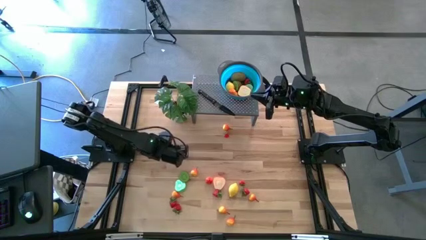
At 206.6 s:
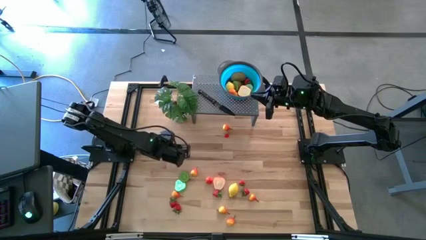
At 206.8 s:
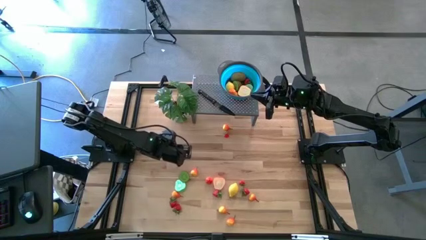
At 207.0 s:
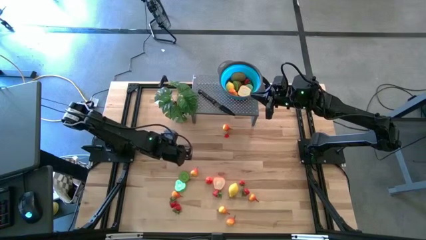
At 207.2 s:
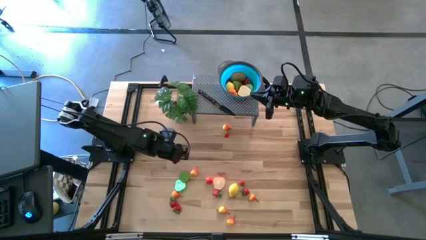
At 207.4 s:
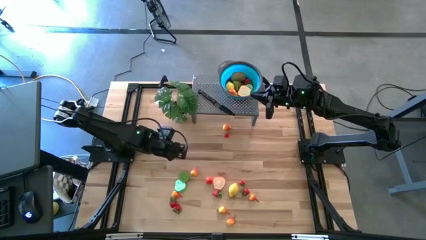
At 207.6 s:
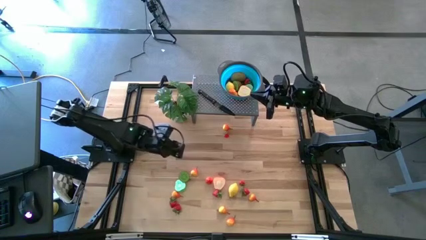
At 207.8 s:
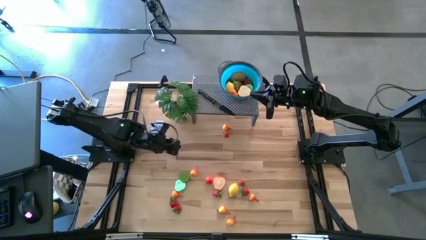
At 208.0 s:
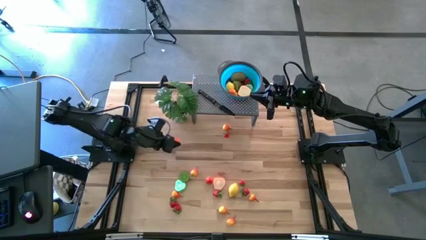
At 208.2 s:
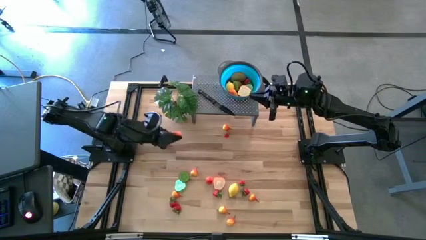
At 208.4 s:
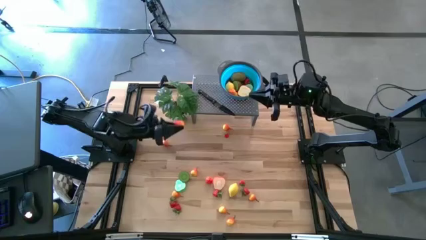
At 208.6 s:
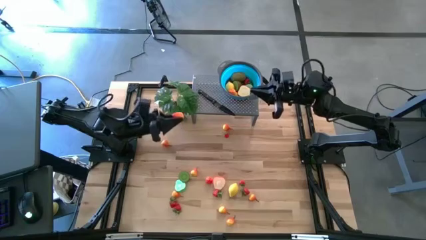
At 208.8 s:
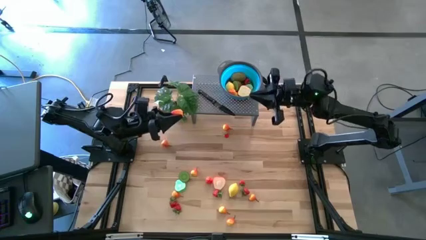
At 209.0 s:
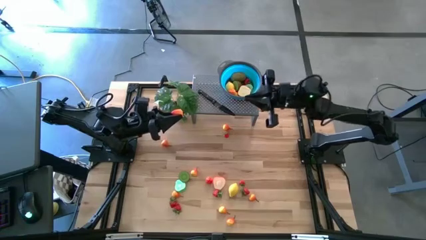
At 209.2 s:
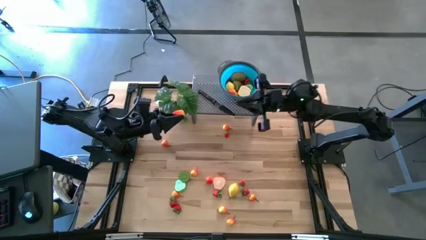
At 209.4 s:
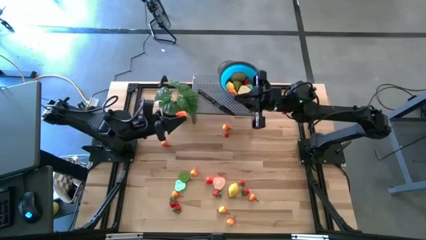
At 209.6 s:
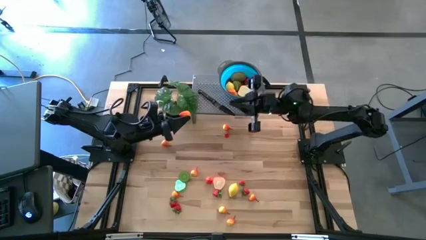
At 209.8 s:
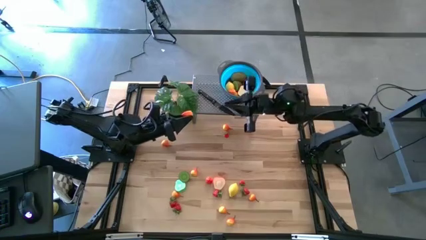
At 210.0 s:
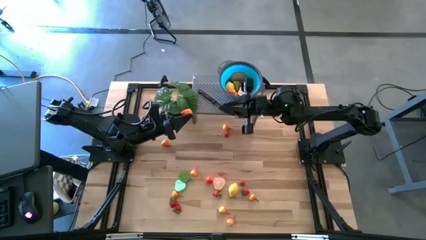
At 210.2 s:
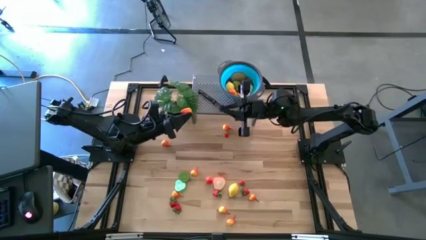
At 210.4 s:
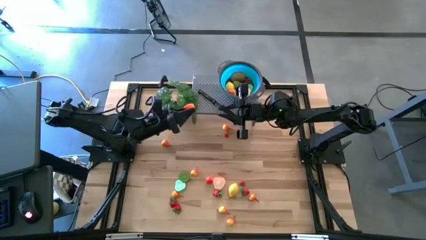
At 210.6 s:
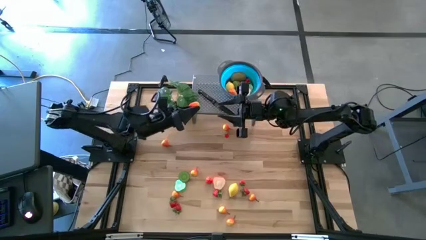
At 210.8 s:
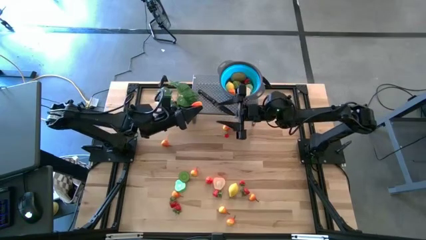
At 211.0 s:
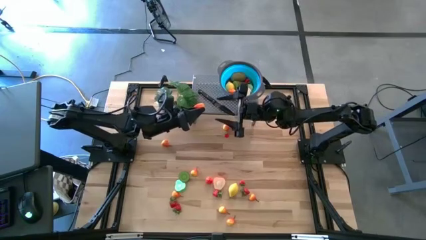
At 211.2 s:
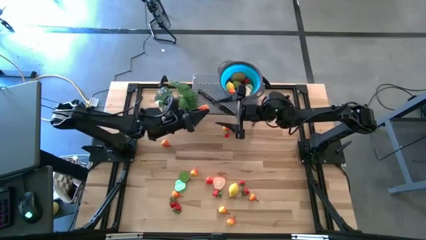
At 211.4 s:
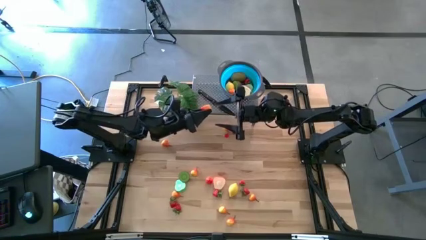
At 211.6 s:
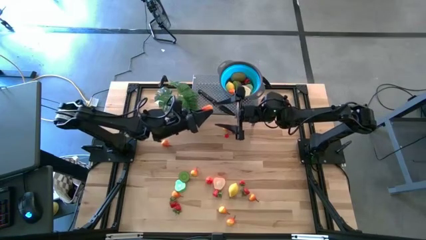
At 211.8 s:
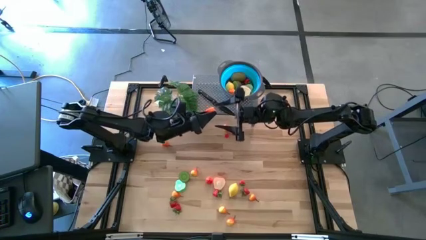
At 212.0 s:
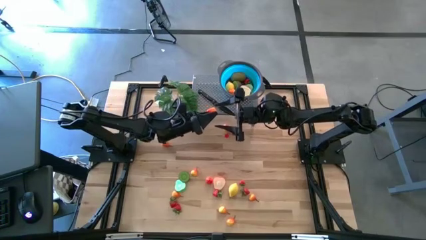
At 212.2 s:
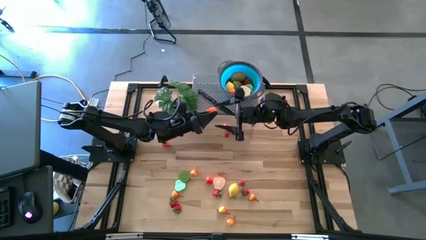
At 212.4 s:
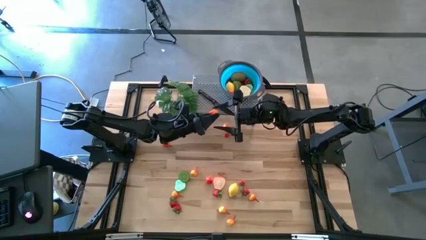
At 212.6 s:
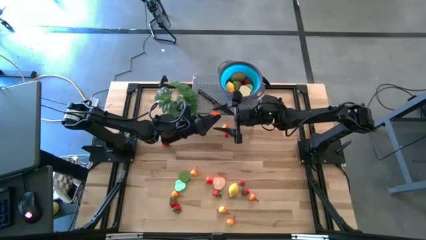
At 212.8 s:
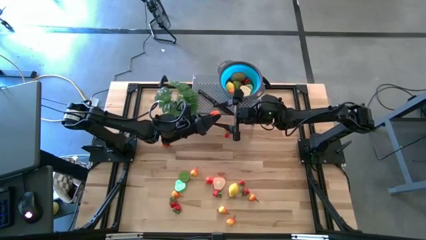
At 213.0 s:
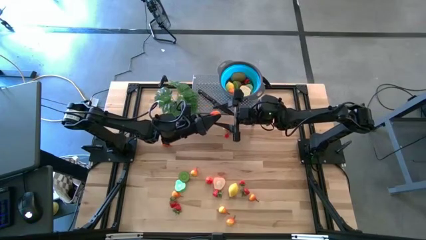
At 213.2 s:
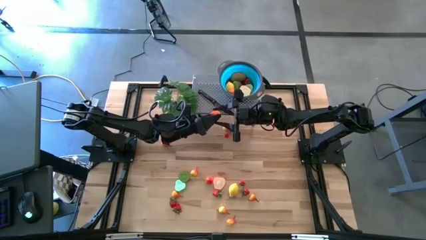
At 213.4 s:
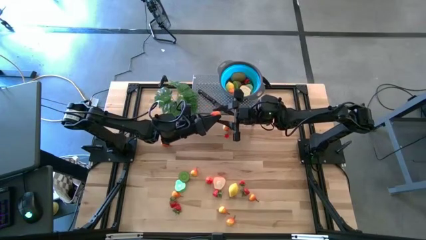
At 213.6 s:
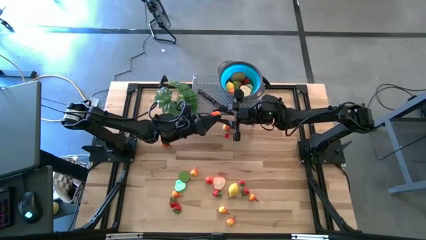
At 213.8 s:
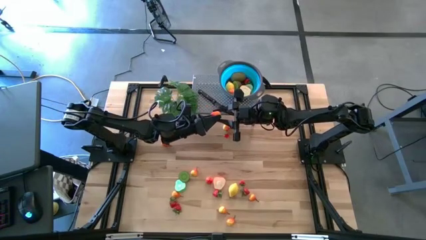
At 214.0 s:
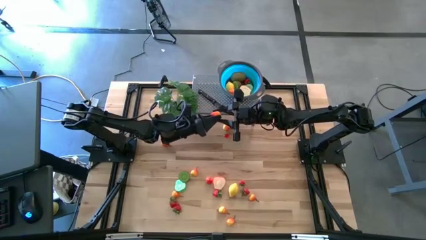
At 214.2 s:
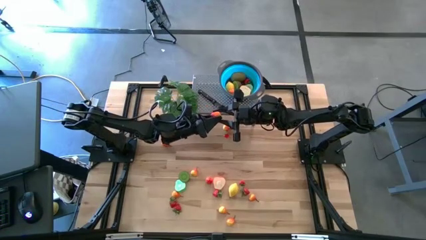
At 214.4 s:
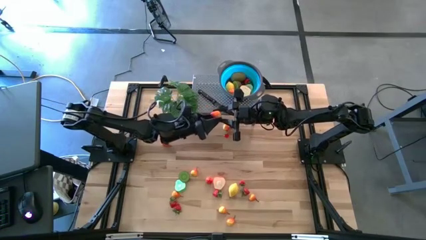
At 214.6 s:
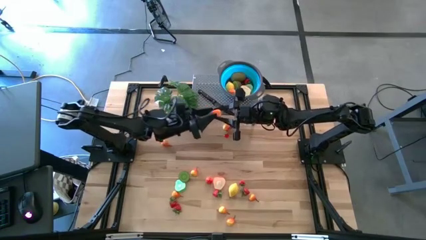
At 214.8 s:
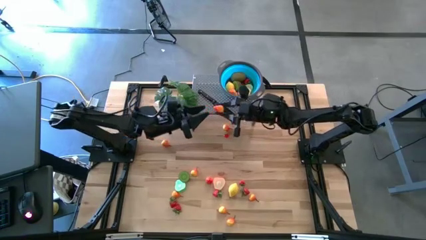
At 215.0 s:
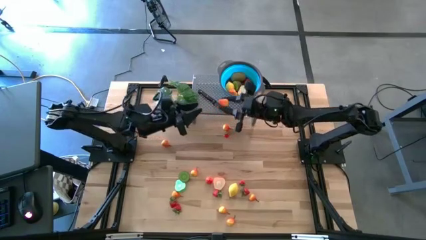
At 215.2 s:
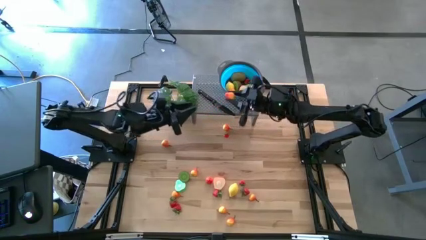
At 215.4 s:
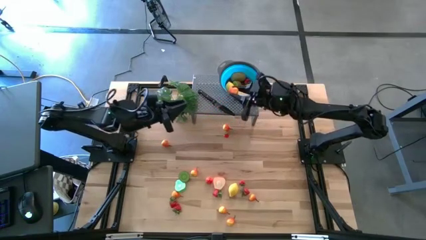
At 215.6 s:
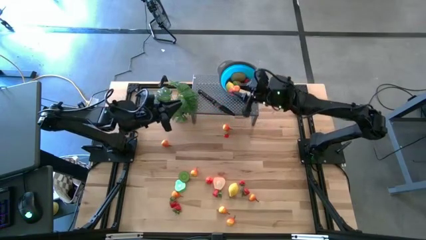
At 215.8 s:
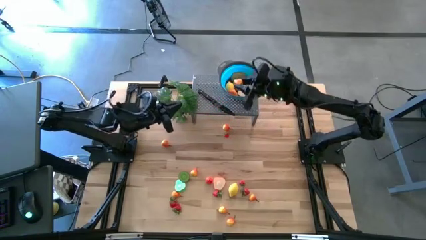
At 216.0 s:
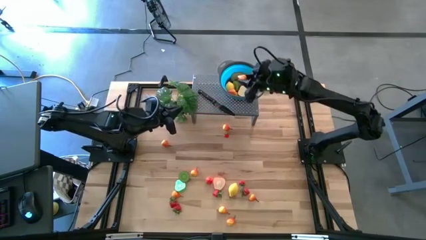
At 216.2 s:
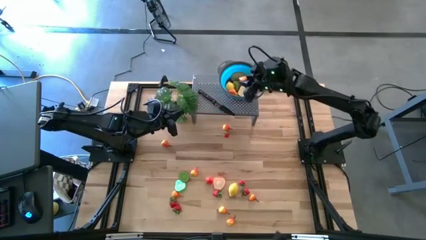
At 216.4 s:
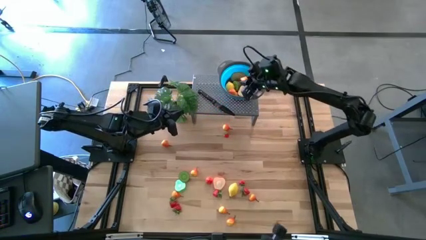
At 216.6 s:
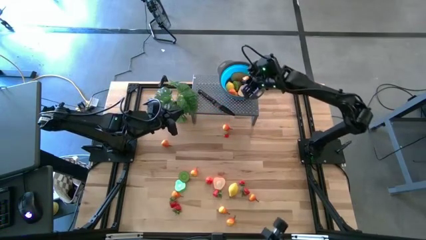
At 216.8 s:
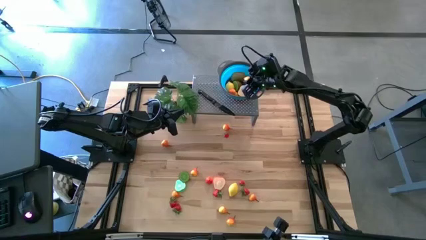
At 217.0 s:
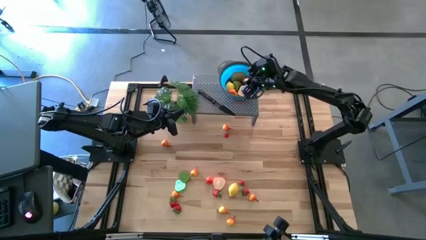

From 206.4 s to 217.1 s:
Task: Pick & Place Fruit
Put the yellow pear in the blue bowl on the shelf

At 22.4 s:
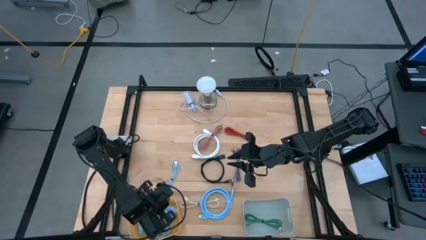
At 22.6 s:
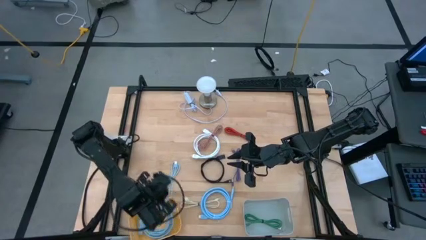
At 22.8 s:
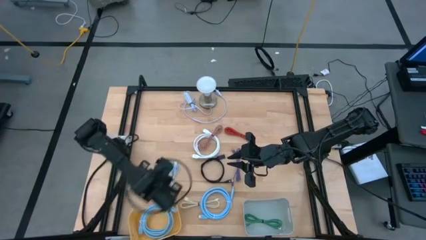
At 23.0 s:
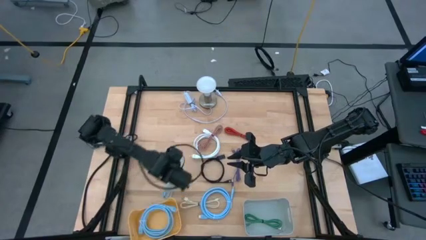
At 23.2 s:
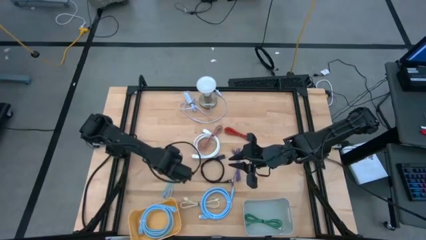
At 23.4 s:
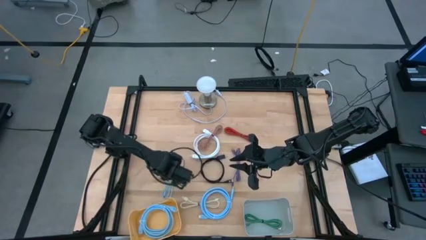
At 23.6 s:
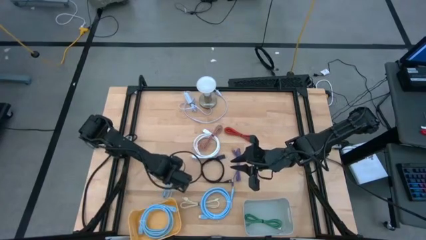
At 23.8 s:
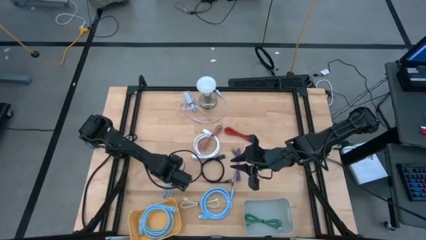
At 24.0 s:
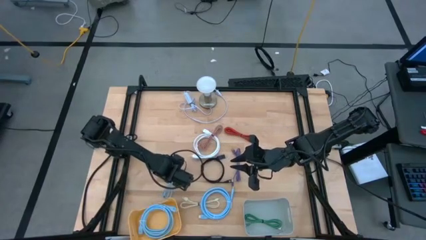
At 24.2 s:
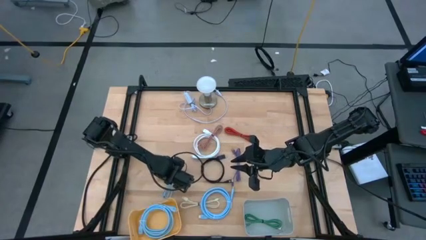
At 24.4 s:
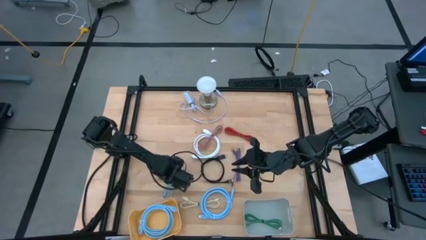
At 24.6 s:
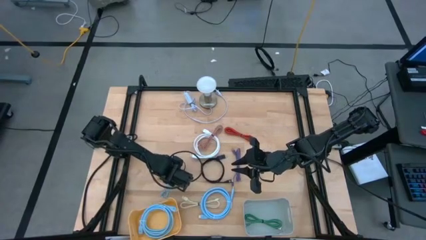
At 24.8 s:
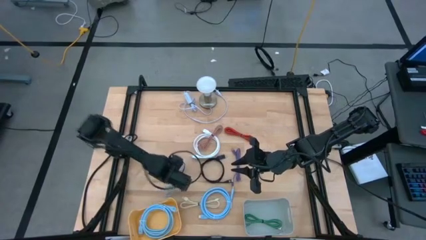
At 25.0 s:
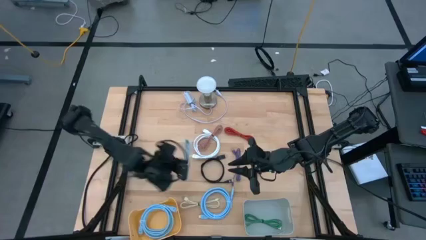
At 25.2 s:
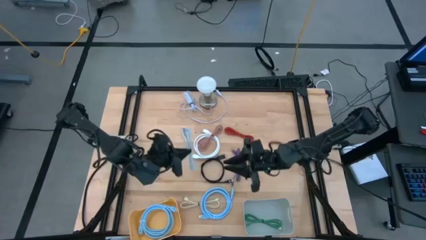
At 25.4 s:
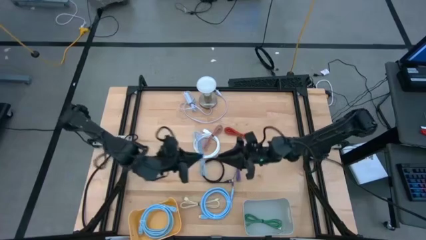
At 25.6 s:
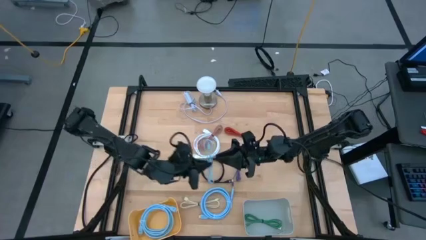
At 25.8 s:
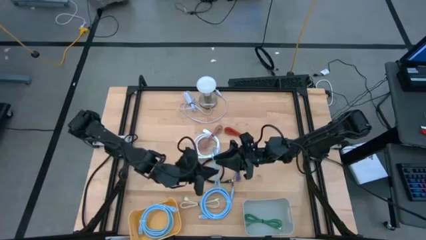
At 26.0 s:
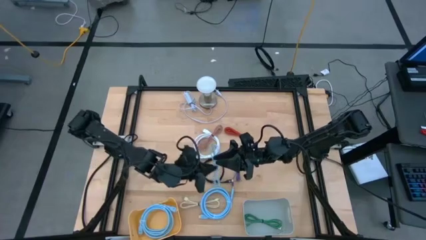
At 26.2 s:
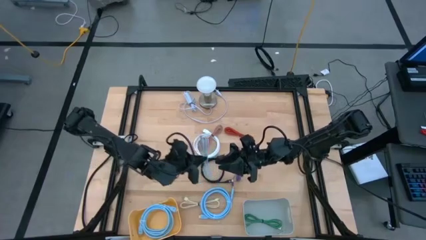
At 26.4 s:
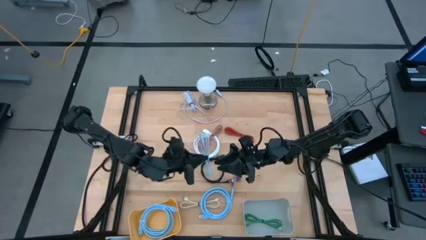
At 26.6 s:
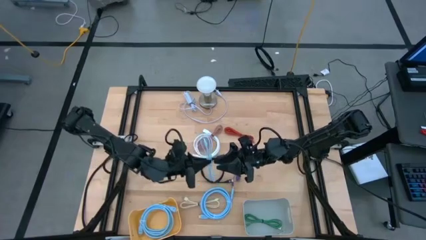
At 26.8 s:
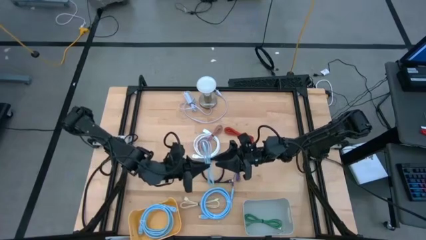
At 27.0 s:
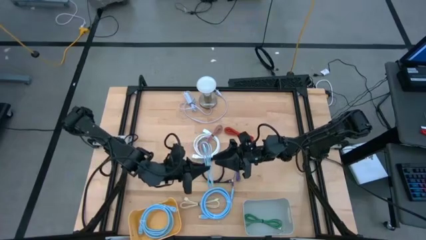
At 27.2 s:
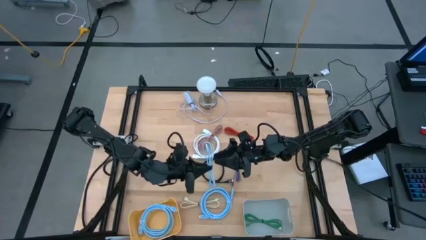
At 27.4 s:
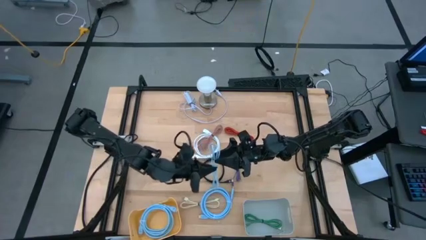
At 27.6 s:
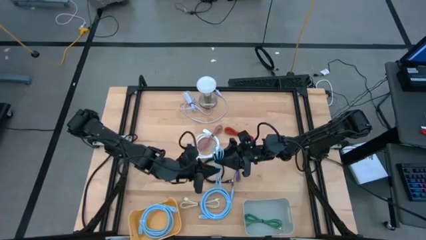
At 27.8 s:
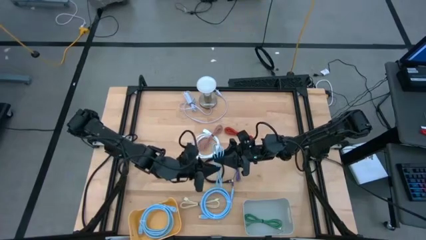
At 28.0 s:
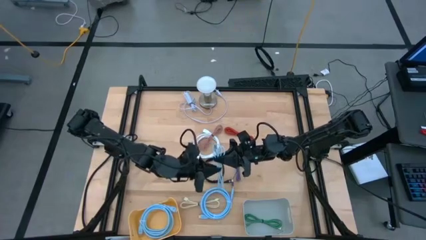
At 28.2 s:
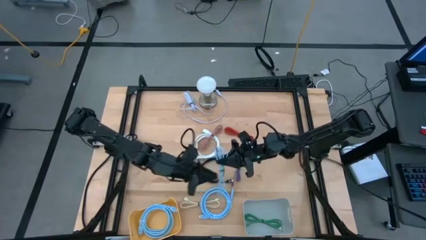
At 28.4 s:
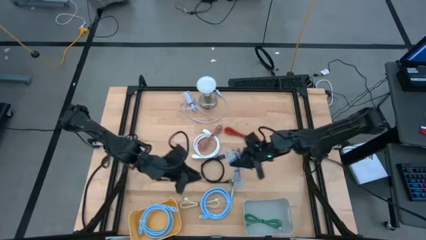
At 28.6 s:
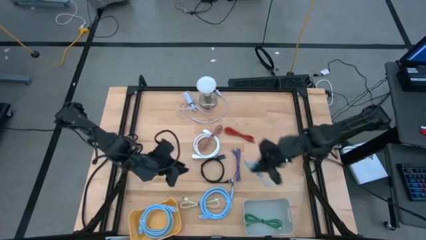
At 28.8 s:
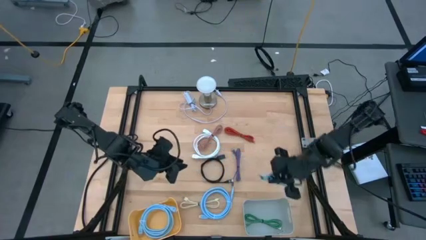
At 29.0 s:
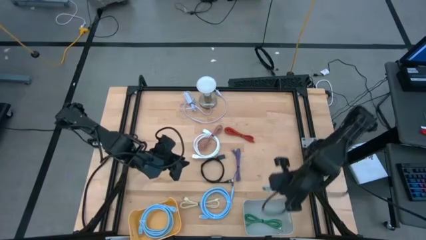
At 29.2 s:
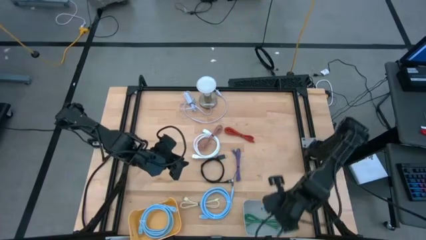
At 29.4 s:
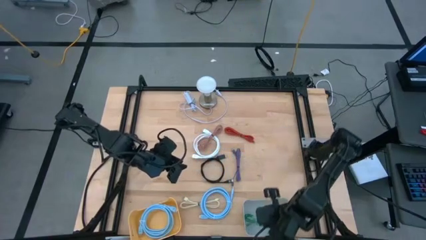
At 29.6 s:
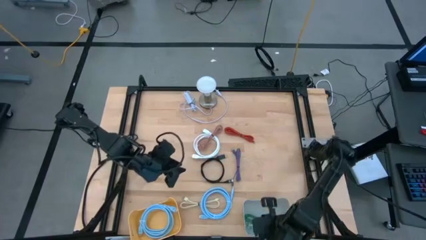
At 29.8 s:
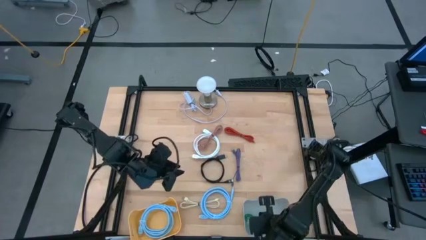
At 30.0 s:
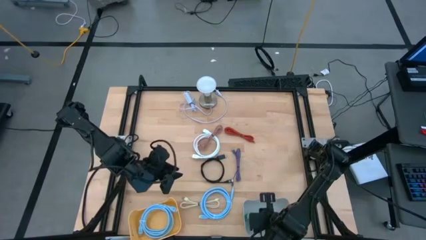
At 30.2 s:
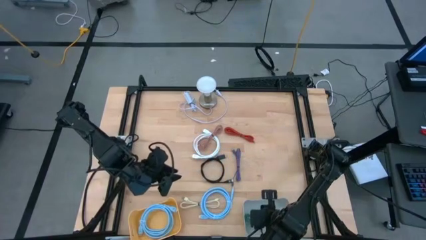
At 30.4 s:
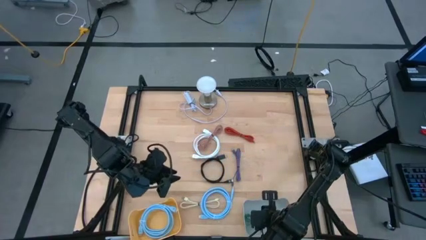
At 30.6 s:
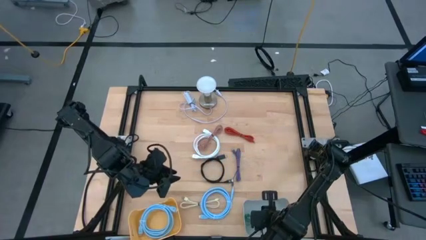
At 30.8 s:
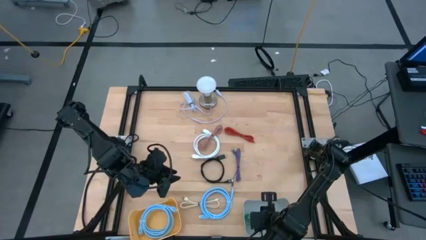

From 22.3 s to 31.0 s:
Task: Pick & Place USB Port
Put the blue charger cable into the gray bin
